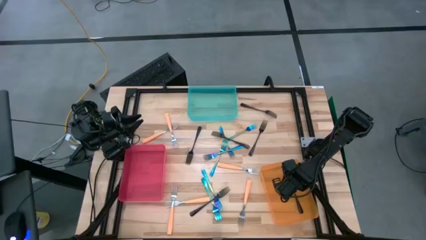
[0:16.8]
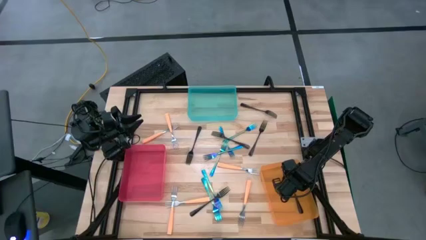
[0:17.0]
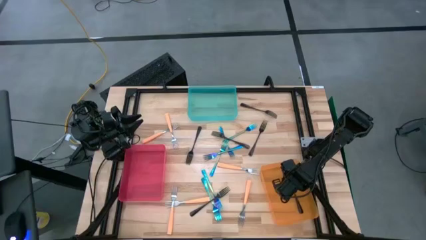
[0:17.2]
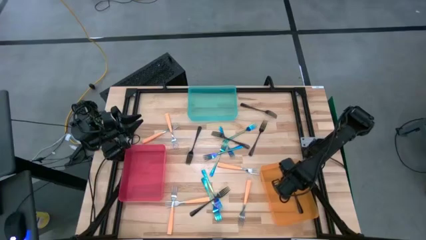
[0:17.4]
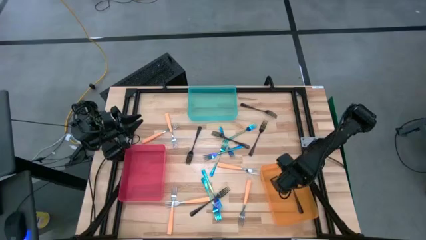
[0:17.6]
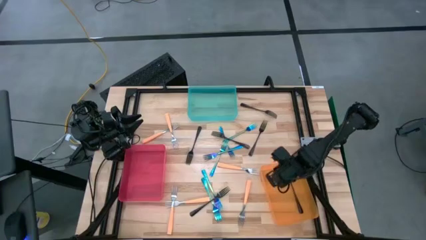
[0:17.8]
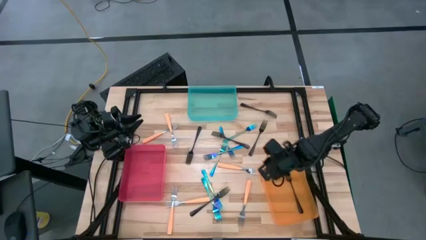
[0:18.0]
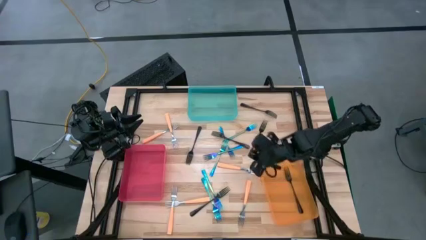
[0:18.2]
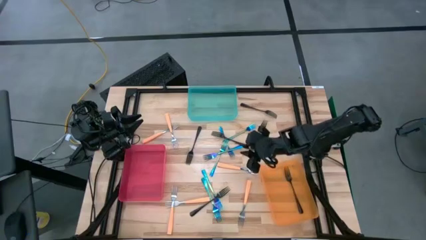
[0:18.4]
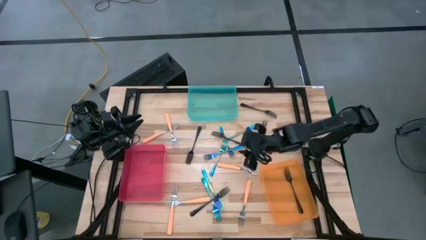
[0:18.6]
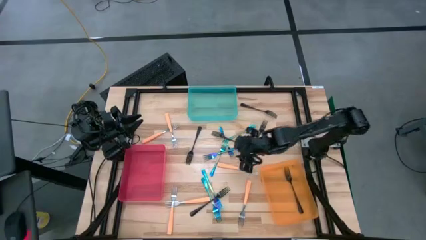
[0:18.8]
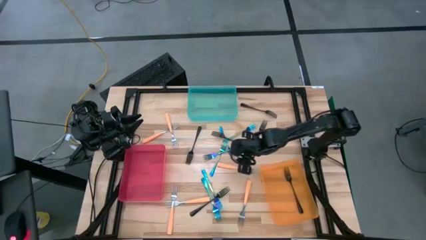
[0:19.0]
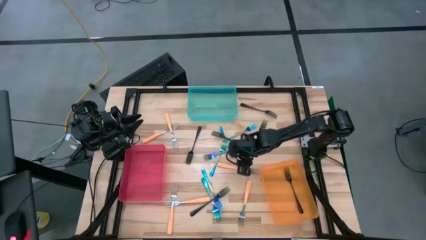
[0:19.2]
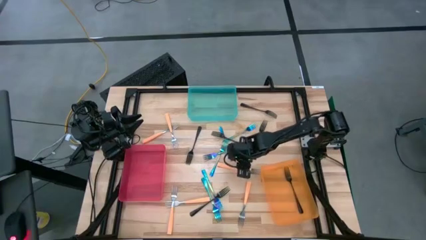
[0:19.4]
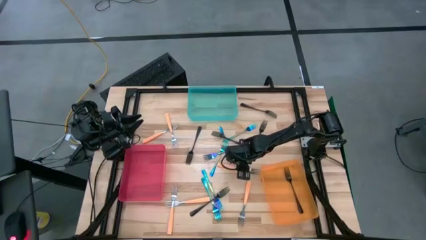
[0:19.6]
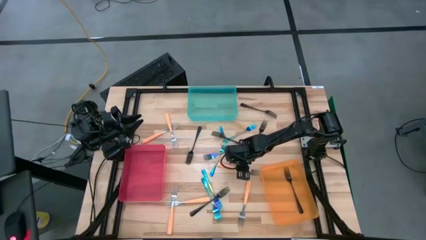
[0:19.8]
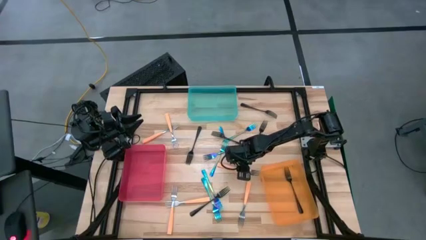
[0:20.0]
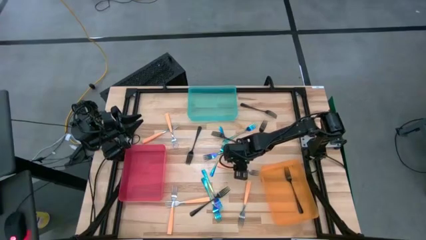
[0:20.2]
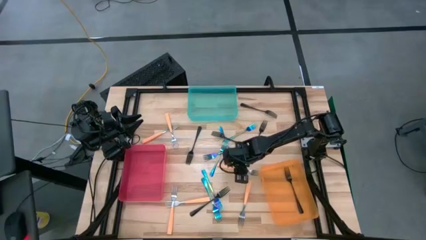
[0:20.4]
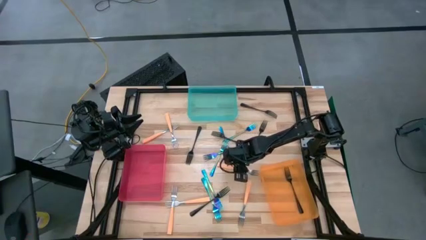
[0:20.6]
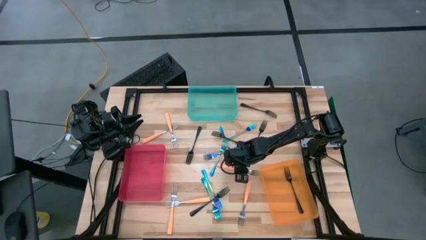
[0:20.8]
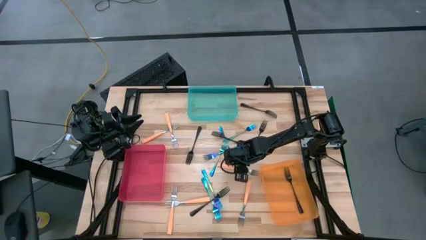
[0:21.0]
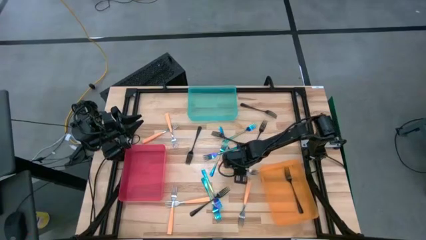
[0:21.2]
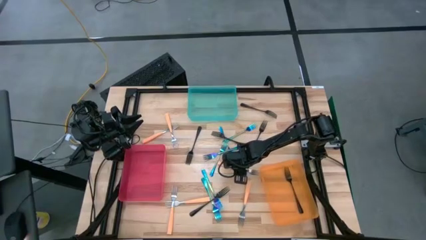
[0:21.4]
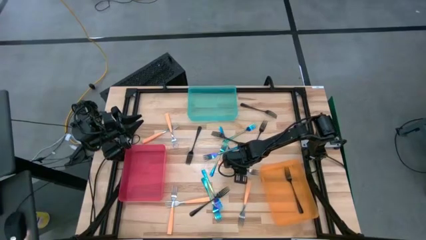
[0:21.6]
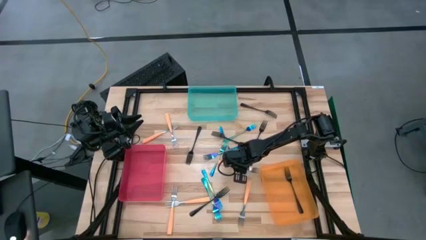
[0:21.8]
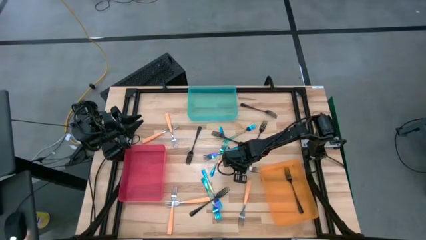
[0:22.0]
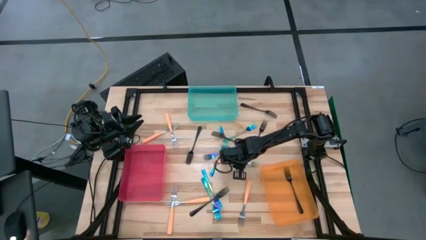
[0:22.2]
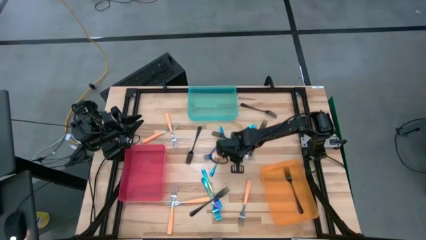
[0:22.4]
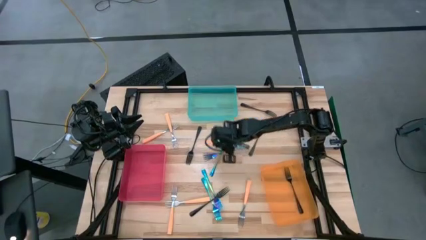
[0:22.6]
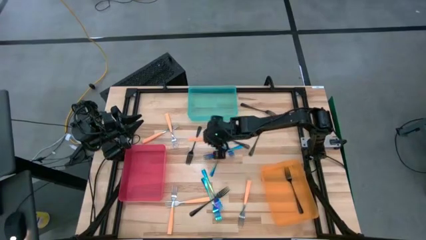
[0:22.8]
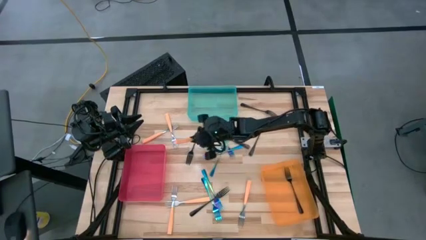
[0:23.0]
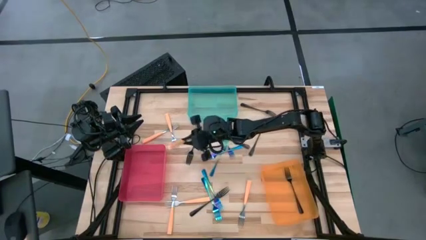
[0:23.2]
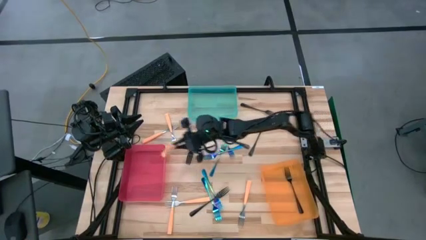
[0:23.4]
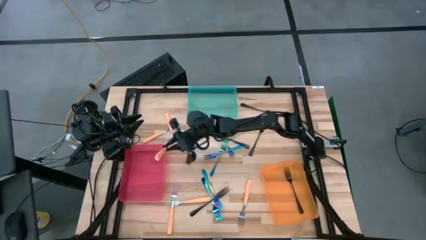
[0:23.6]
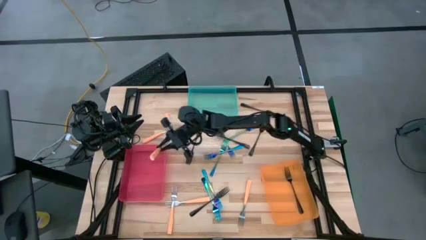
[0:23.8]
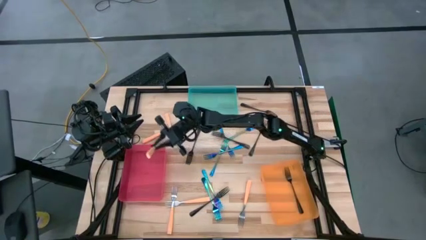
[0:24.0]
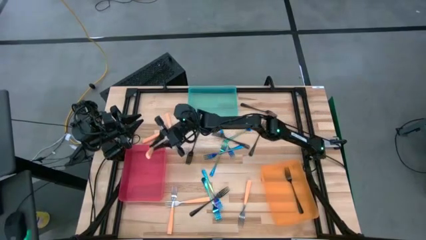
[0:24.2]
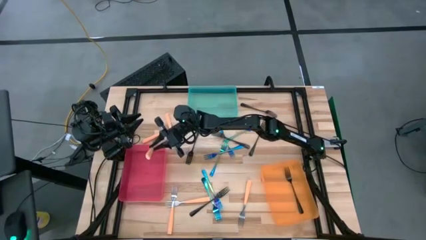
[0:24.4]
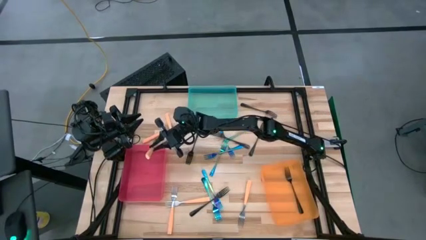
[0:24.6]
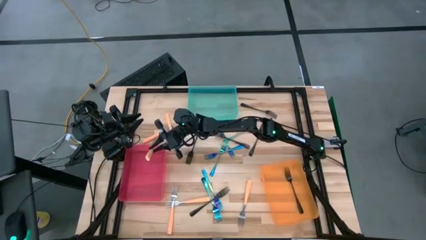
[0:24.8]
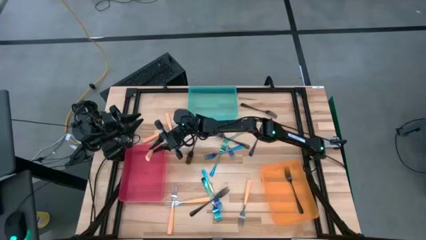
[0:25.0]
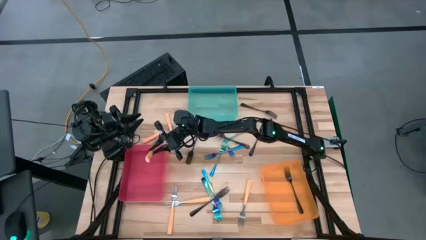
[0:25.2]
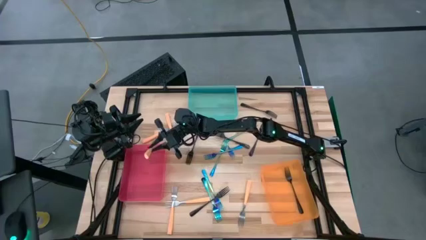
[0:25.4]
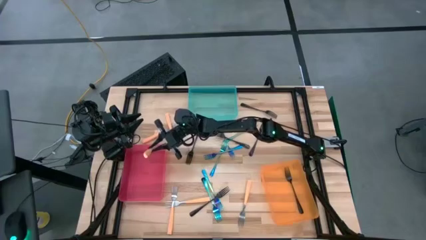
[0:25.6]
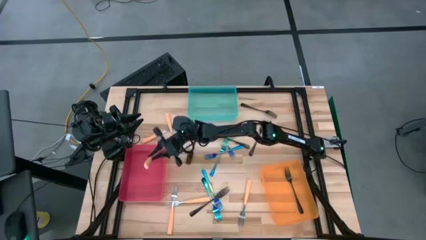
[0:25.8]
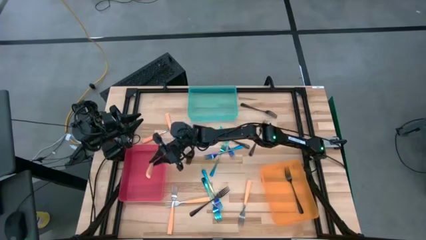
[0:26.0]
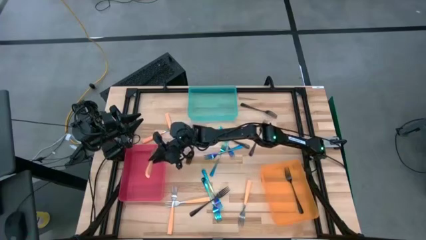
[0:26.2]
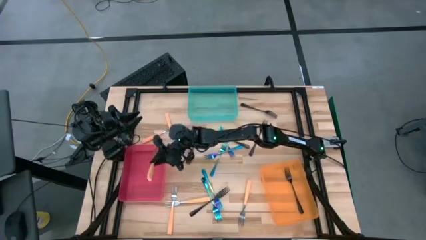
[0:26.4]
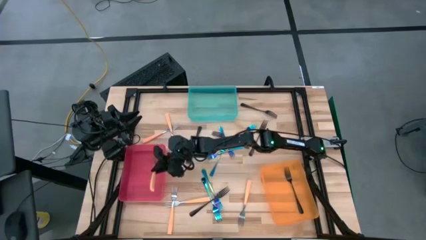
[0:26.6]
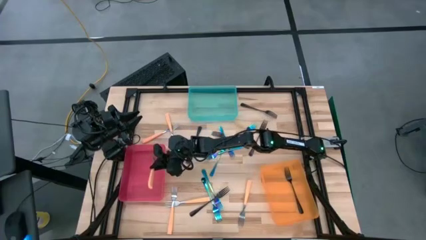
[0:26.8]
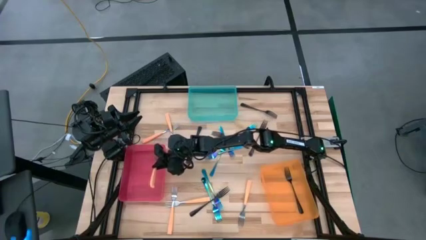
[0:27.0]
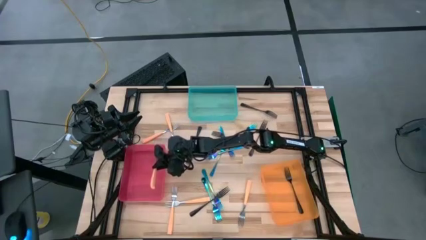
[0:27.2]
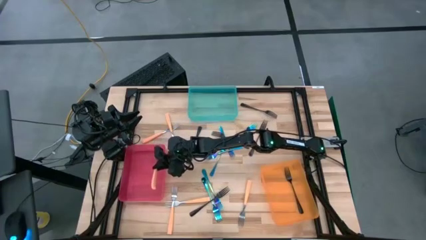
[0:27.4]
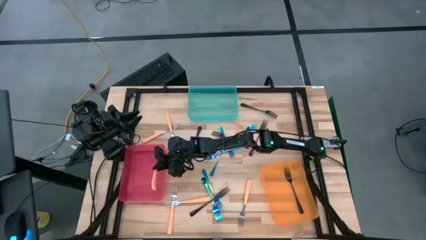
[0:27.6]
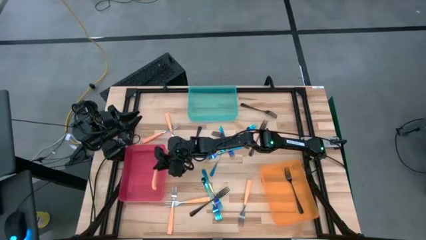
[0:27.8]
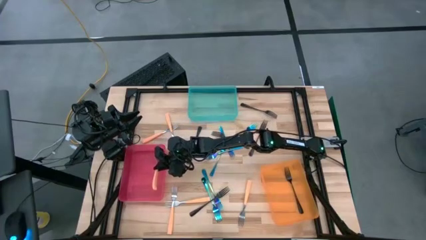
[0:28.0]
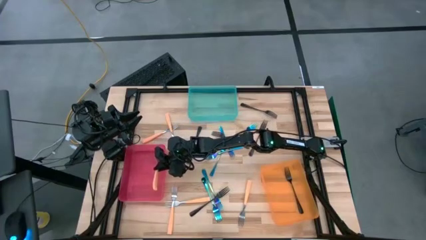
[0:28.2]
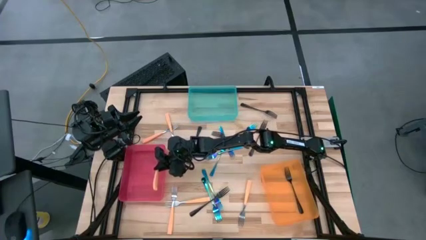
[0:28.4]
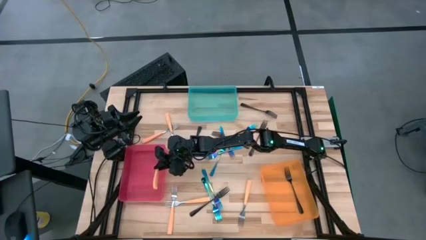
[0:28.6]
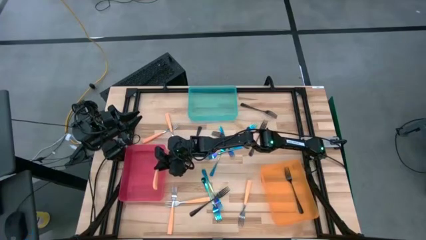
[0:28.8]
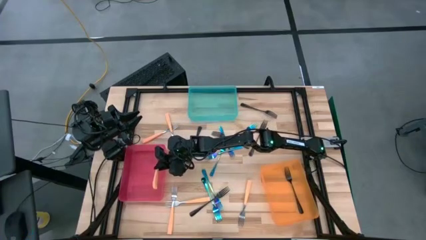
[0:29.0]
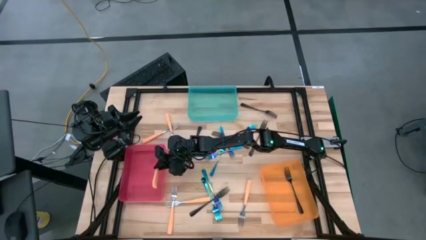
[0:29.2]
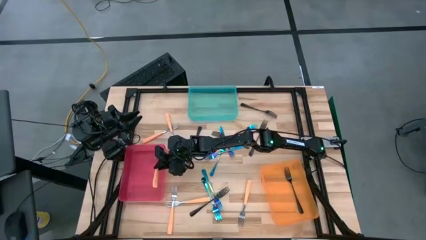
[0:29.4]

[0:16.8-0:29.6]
Task: Sort silverware by color (type)
Put the orange fork into the red bin
